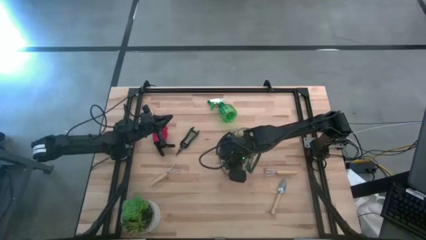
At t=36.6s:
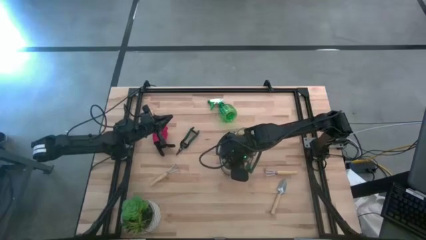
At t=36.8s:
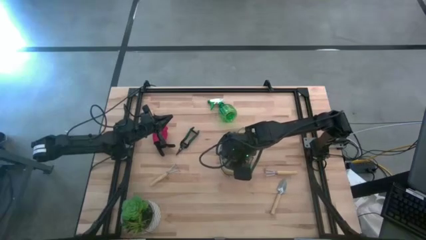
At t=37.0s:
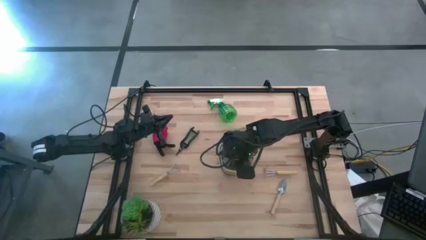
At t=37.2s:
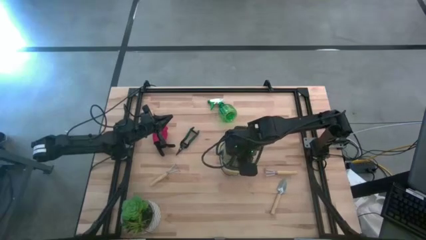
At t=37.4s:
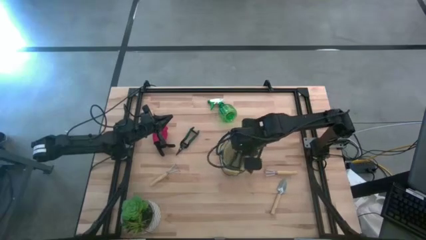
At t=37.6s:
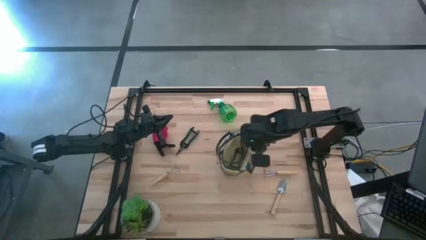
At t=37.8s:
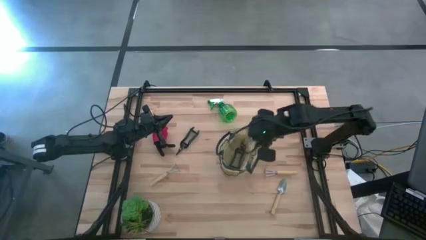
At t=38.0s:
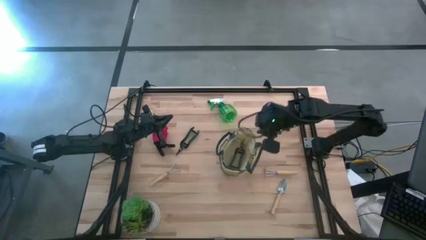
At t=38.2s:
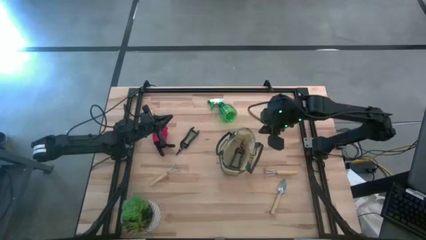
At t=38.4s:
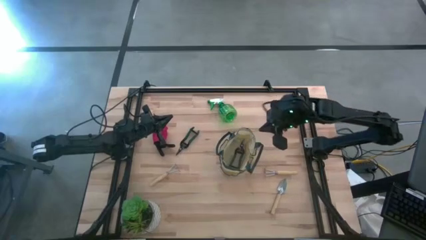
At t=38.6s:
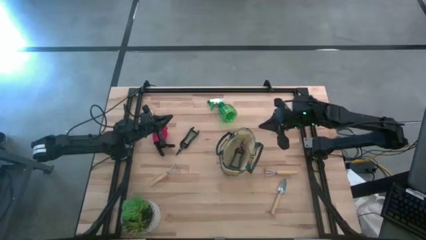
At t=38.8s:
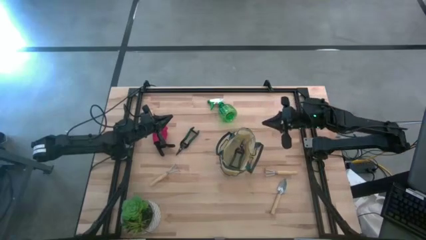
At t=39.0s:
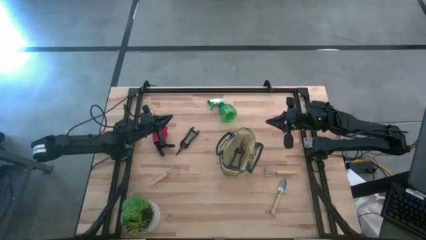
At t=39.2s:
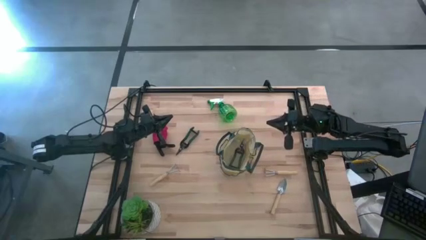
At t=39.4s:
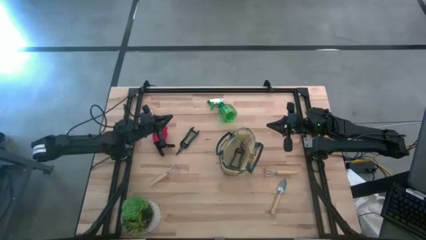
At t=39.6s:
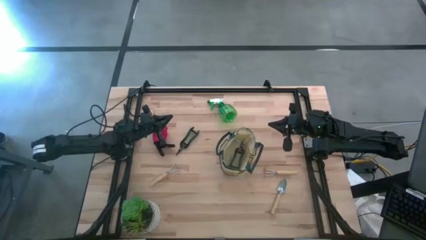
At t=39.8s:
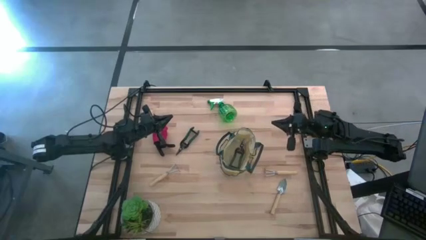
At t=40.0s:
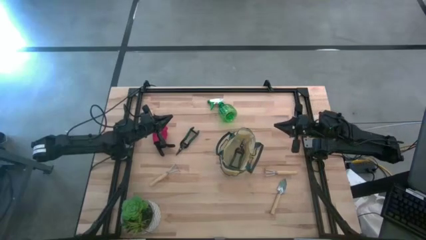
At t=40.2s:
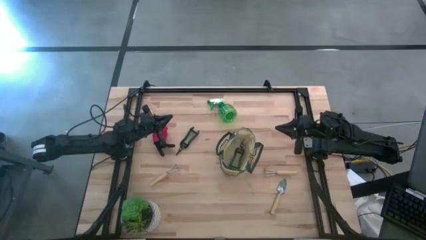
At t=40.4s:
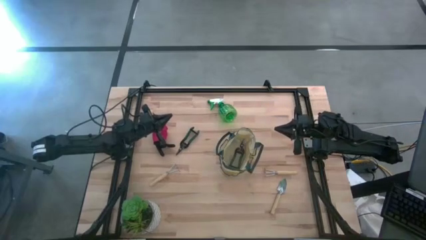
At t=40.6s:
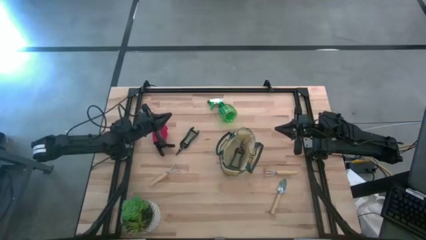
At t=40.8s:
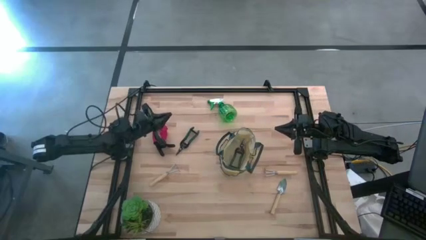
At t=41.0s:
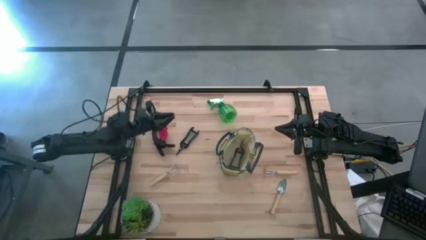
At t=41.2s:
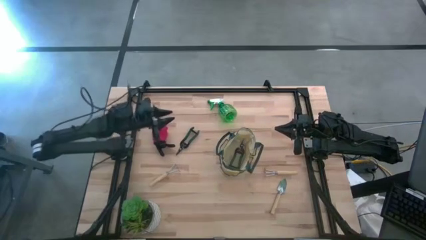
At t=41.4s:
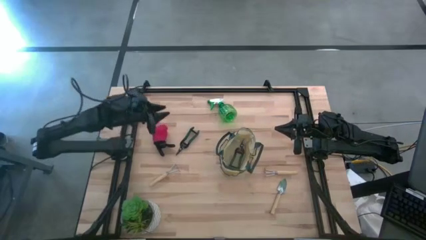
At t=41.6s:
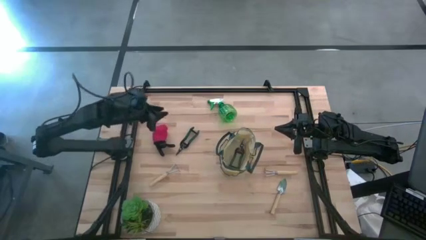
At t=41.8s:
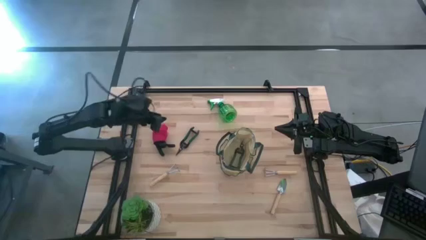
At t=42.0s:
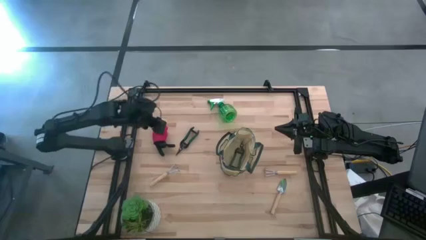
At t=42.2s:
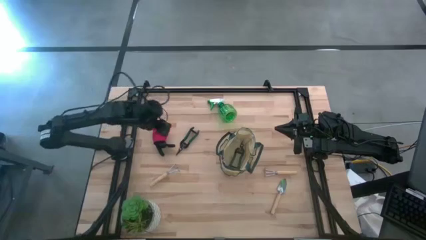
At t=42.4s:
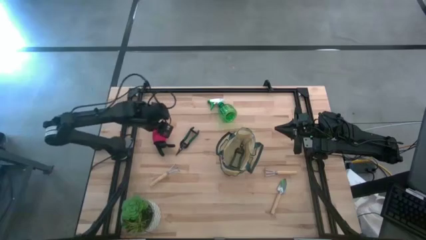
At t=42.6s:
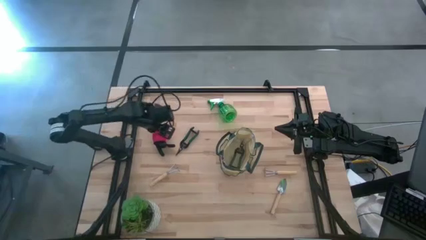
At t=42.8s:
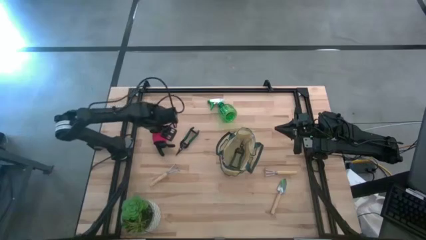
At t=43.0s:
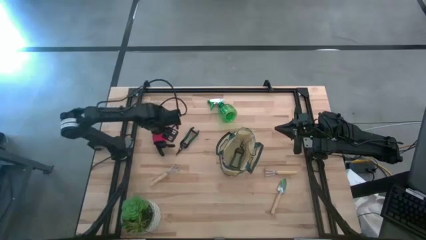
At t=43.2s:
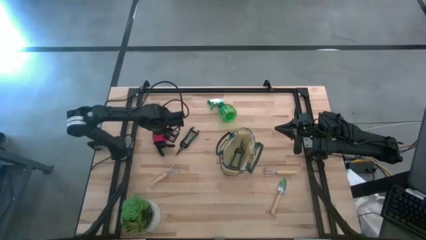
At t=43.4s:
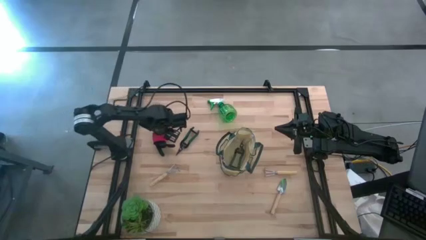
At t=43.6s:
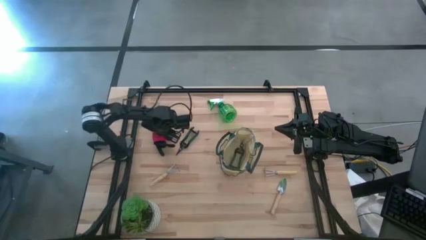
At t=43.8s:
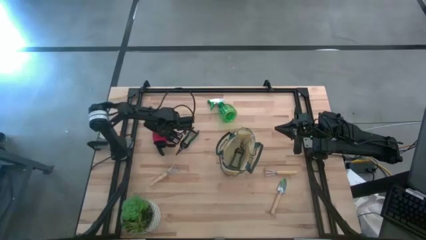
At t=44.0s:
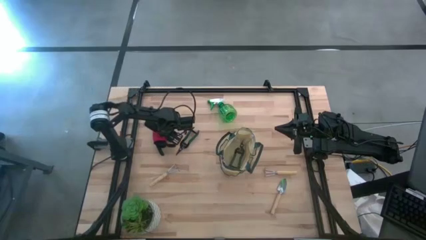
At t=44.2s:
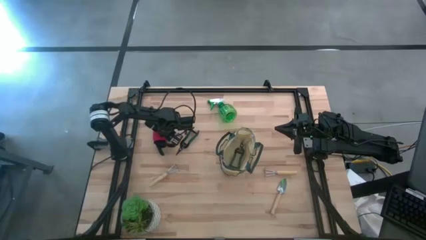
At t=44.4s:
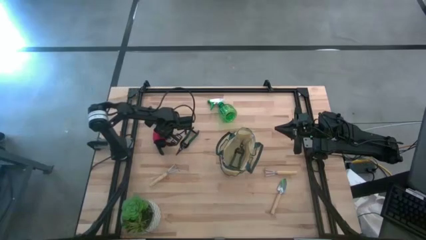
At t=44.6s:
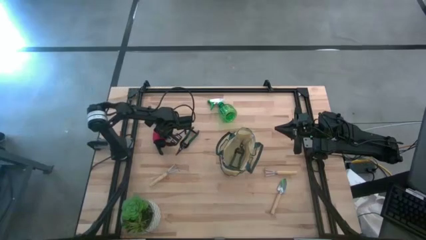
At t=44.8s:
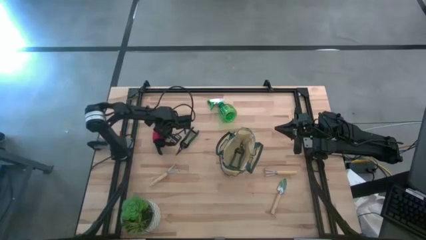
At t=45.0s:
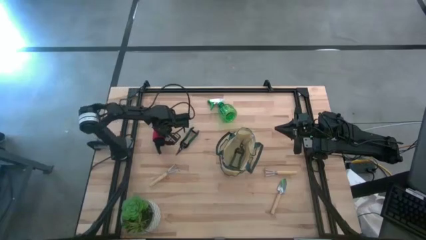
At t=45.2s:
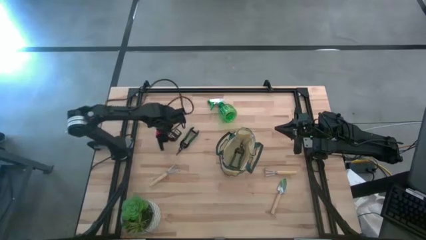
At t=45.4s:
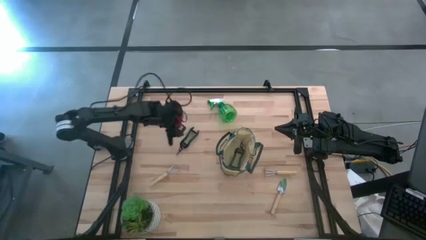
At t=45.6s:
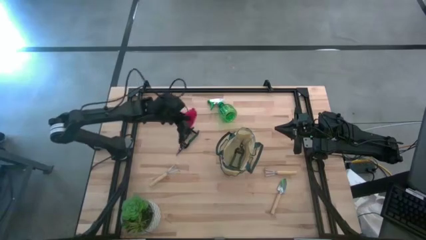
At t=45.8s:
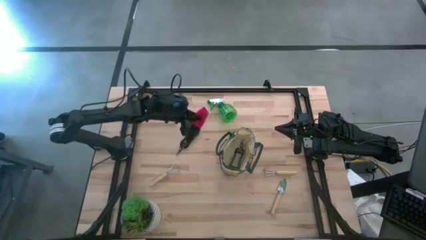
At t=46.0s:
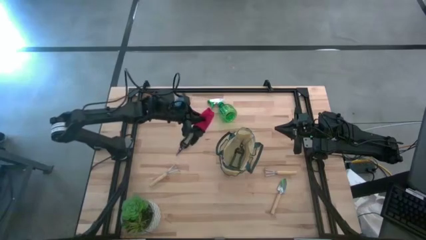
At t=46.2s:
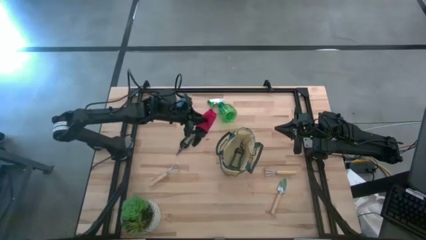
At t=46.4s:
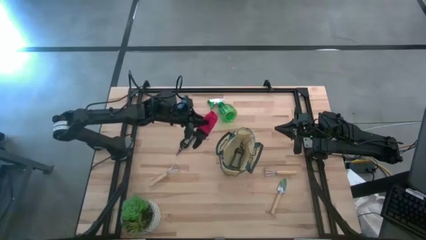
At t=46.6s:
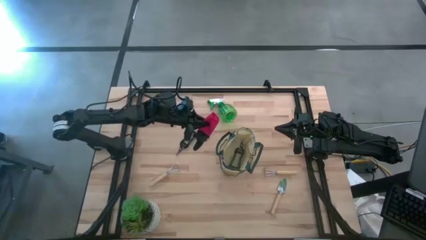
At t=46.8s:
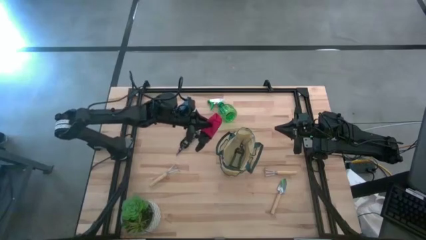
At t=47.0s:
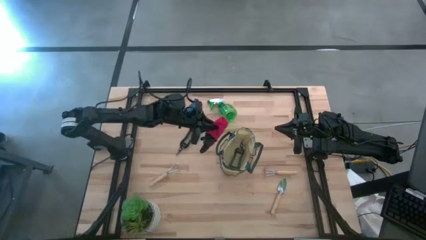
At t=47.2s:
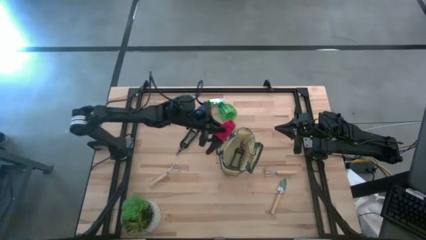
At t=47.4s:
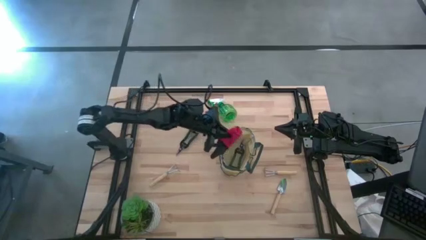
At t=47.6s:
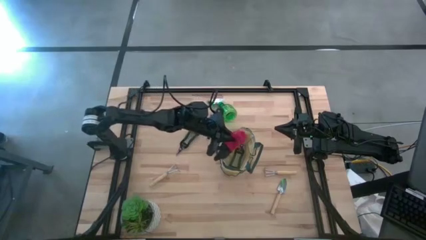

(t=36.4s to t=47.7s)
Task: Pick & Place Garden tools in Gardening bag
Put the gloves into the gardening bag
